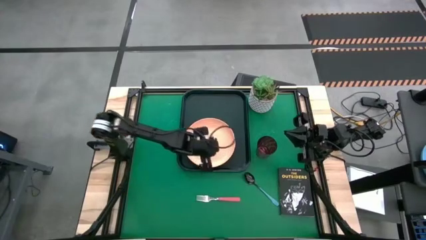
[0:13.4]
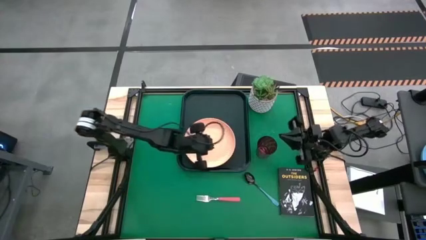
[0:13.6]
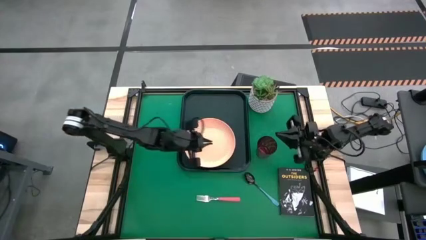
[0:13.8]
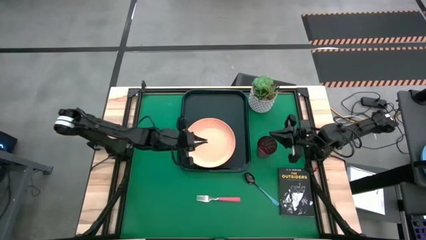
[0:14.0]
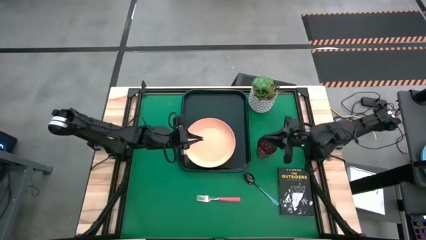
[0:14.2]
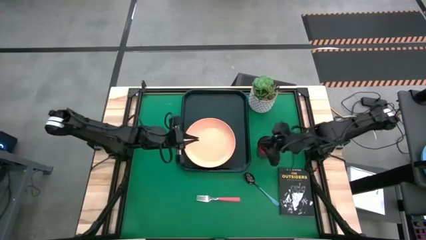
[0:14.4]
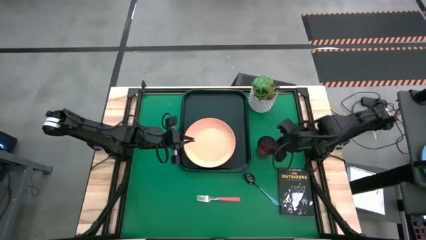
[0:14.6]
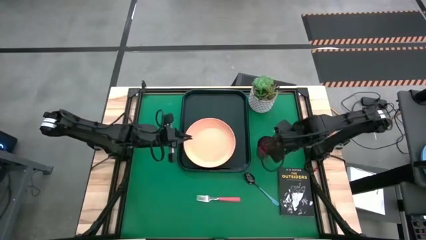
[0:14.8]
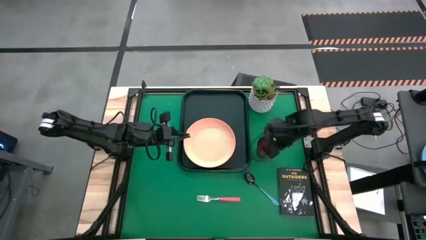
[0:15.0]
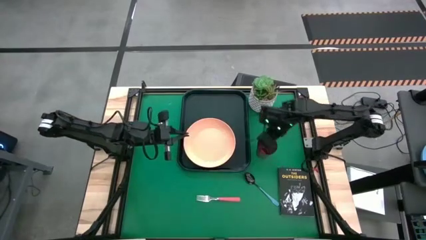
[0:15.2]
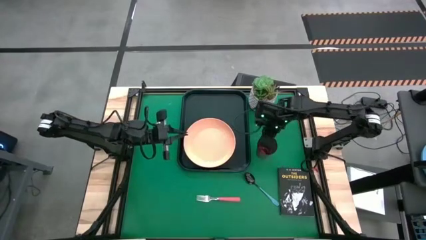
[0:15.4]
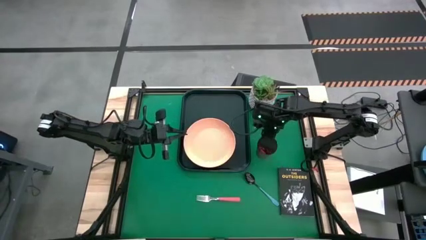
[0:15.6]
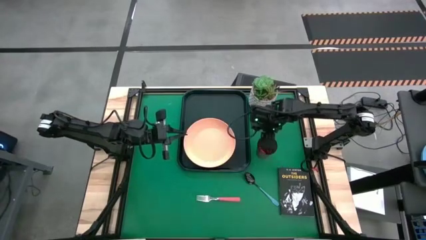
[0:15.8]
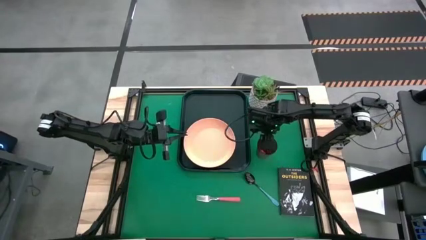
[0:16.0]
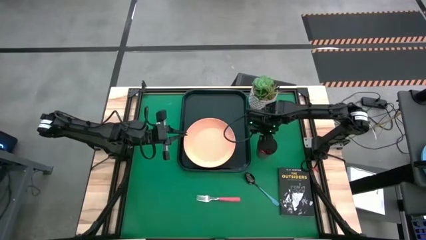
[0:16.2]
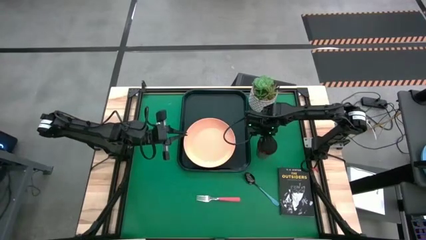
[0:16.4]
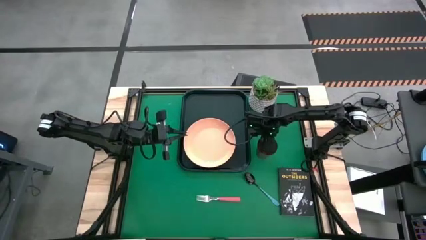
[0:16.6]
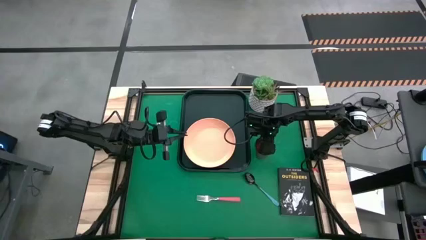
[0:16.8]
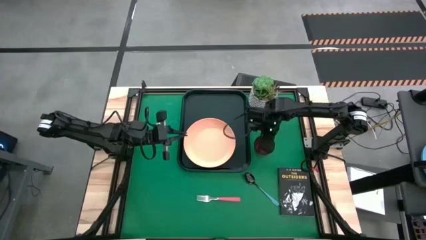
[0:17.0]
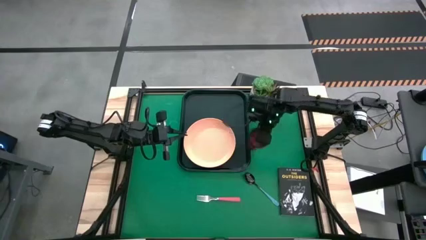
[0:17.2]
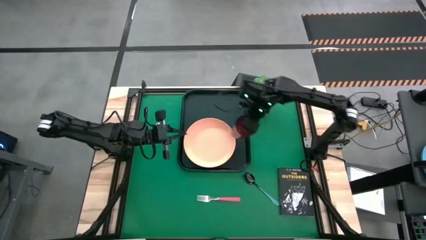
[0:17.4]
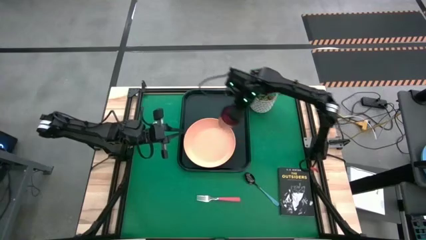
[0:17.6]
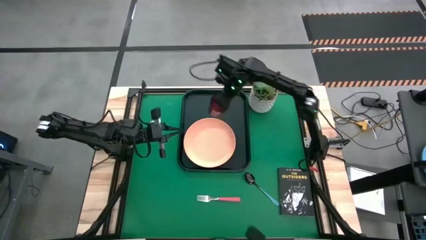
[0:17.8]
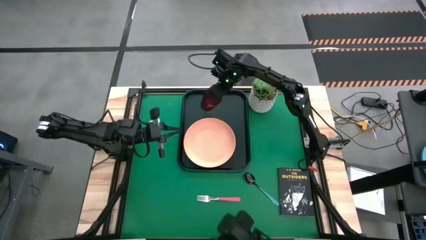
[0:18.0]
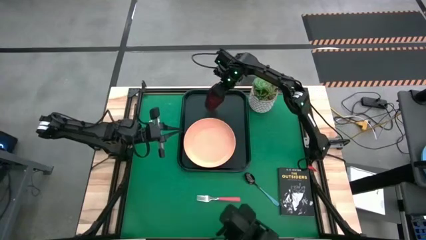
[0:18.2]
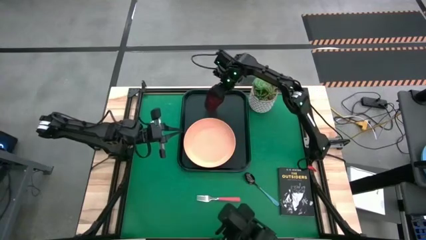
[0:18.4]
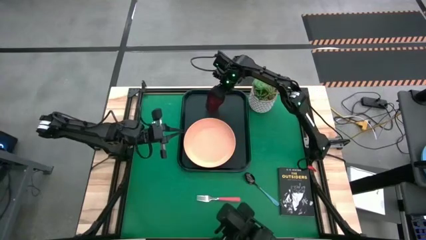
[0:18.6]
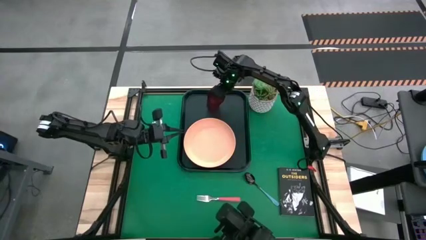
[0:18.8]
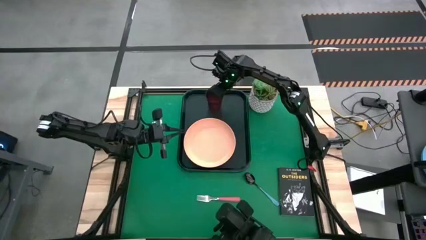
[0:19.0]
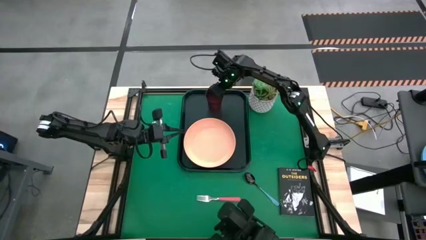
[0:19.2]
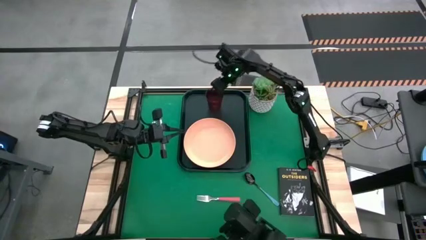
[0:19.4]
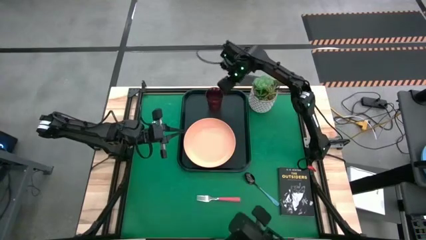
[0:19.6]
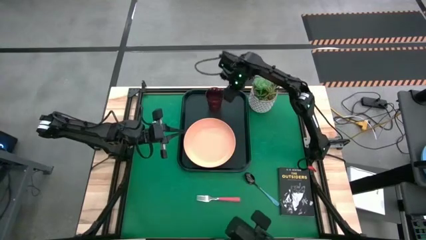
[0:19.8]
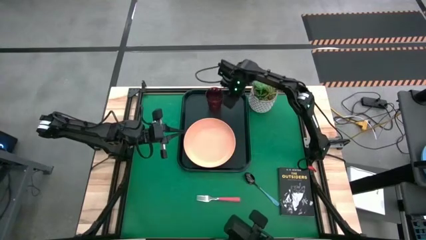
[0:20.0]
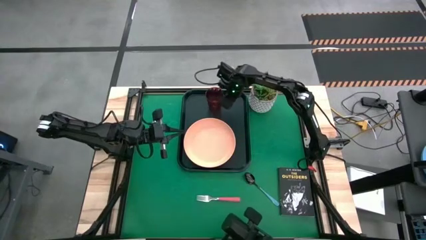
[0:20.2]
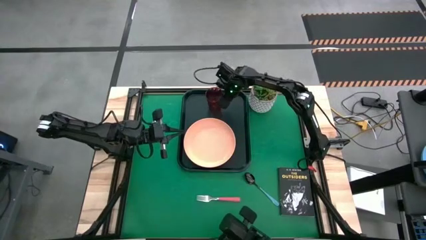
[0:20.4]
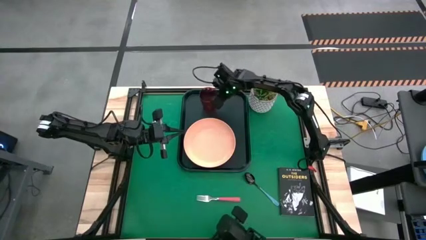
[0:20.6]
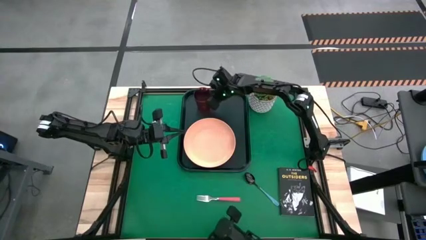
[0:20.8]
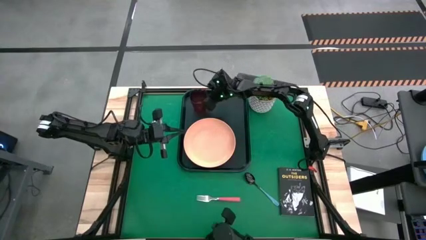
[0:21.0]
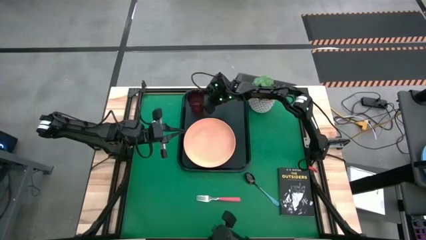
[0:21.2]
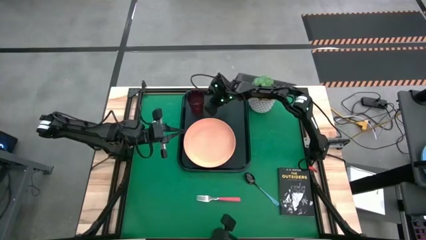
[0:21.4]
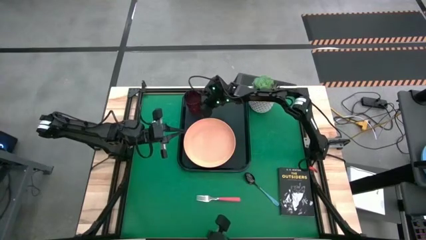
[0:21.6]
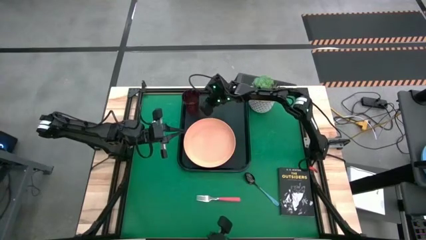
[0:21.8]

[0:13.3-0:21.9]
Task: Pick and place plate/cup/fork/spoon on tray
Put the red cup on the black tray

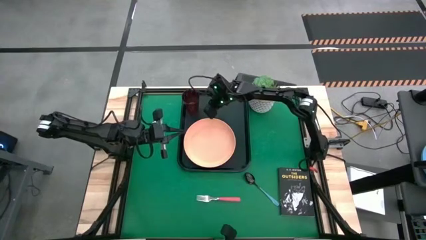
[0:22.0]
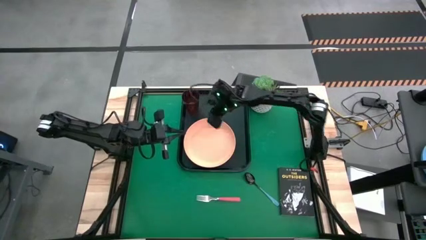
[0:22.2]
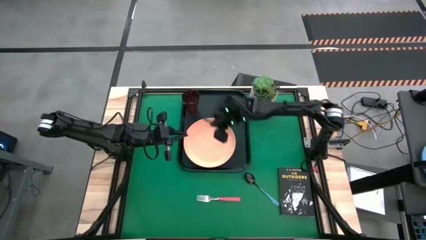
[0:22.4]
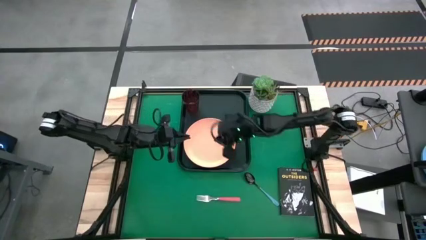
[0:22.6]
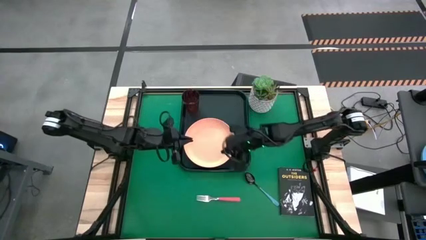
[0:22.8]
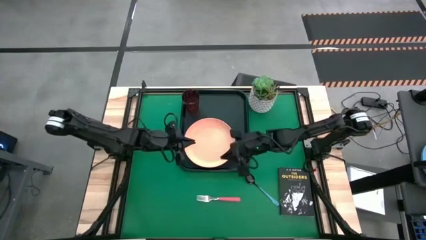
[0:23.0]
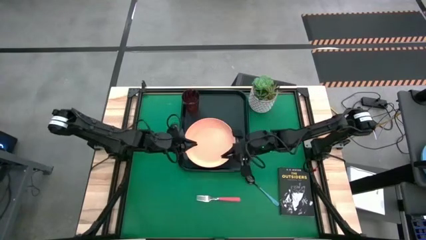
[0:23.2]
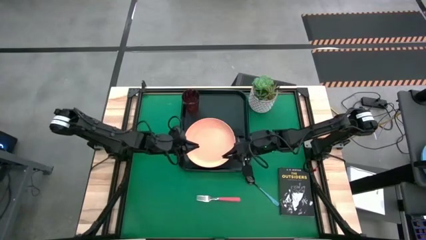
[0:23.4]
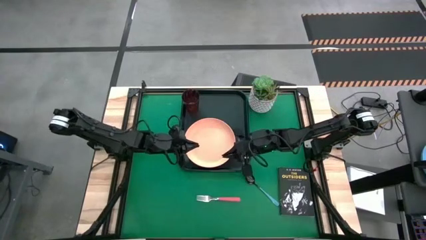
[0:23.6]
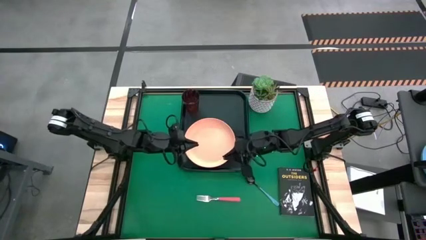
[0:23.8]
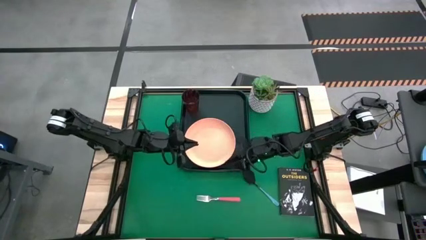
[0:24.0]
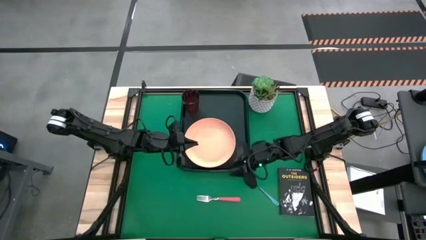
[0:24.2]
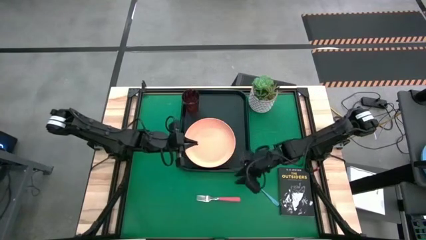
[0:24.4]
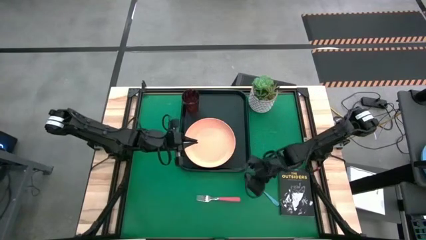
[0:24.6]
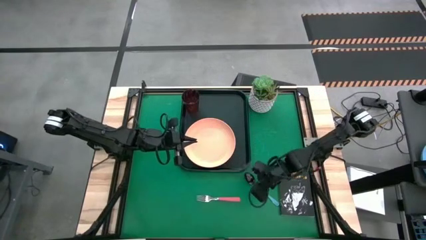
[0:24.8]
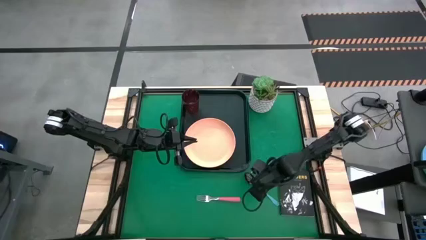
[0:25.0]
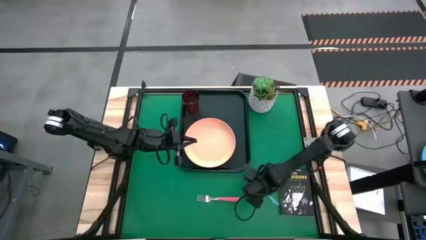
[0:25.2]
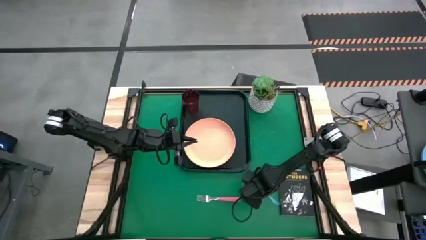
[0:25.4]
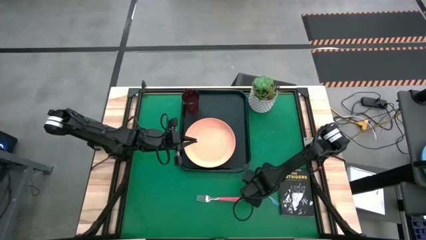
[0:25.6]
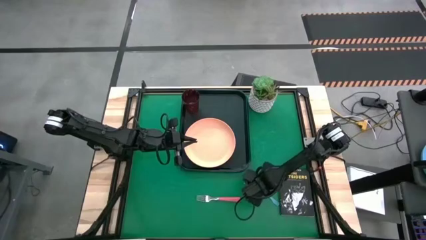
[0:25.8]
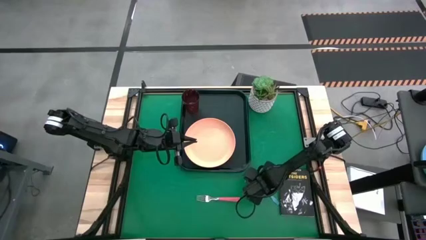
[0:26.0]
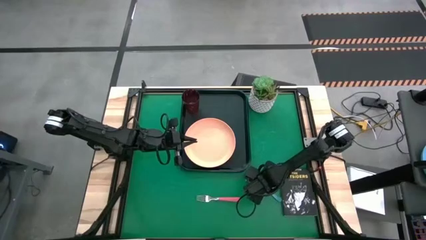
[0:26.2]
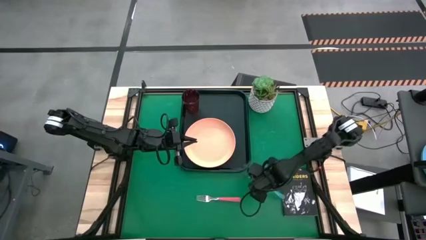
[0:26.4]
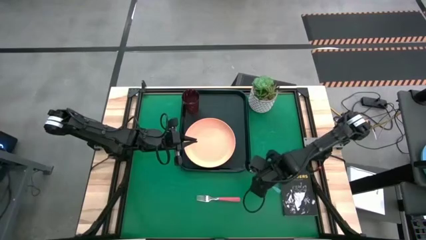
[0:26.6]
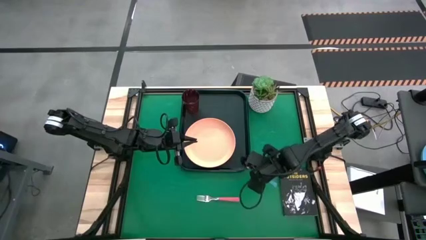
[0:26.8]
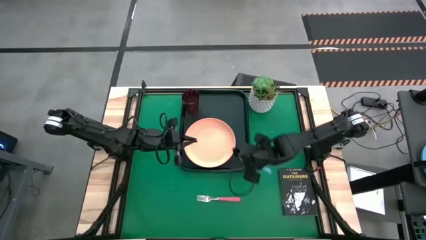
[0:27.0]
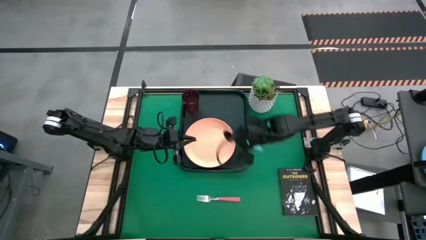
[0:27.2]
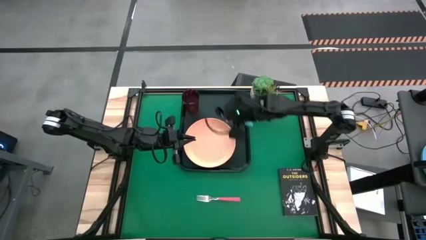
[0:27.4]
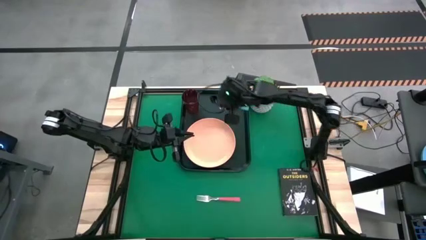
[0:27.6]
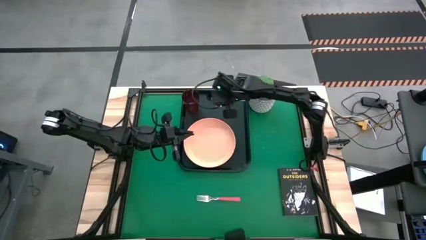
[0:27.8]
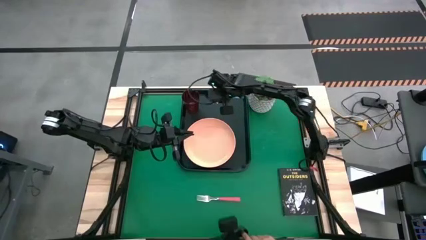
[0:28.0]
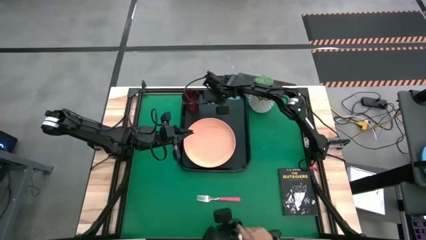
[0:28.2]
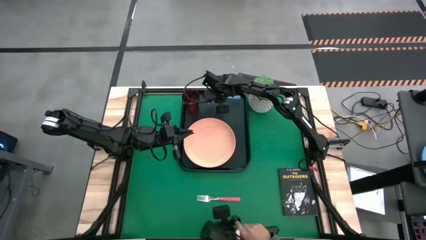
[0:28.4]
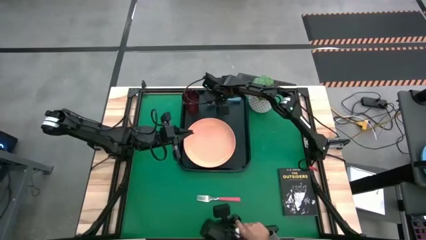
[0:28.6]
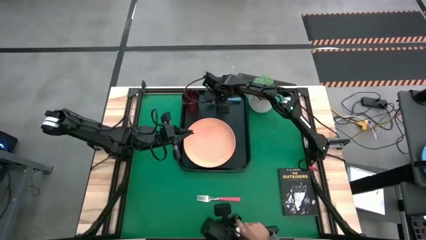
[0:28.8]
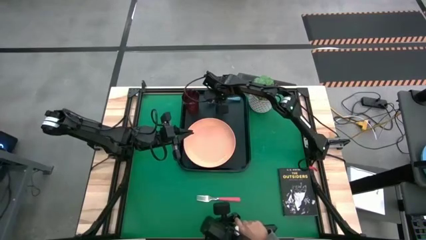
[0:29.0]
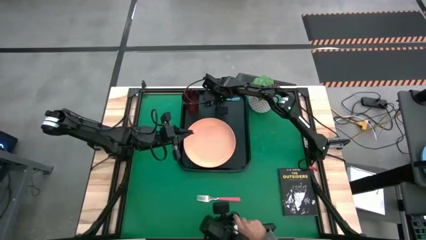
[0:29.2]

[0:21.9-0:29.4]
Put the blue spoon on the top of the black tray

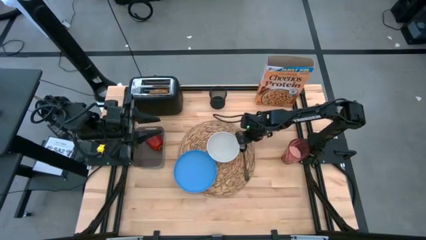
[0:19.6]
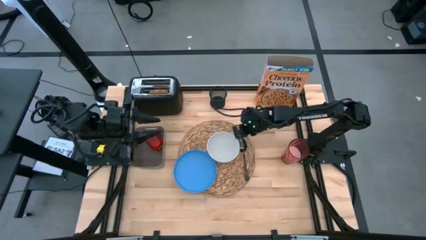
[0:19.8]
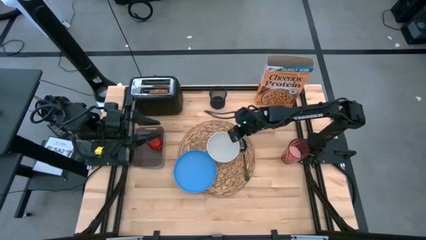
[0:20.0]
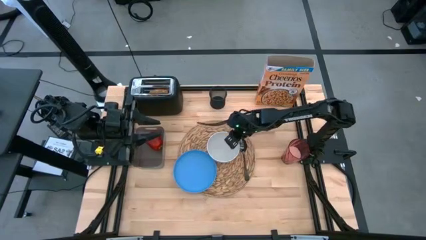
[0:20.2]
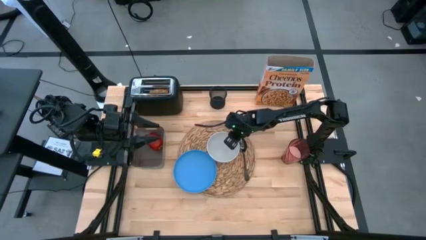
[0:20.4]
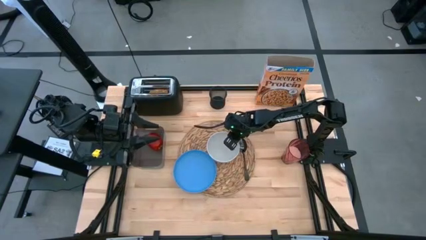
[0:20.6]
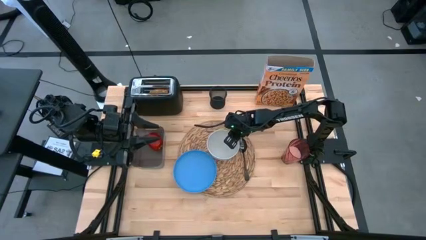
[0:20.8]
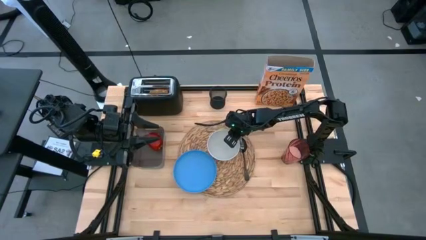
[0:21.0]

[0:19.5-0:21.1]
Task: Arrange a breakfast setting
Adjust the white bowl on the brown woven mat
